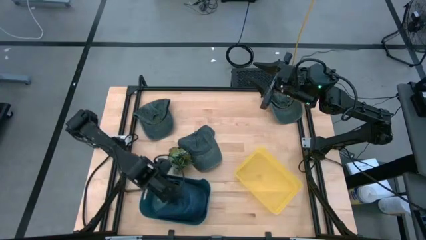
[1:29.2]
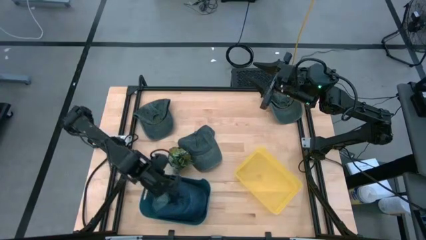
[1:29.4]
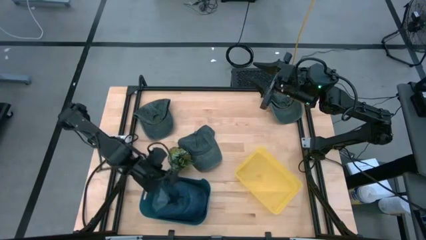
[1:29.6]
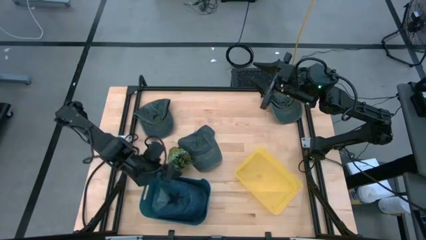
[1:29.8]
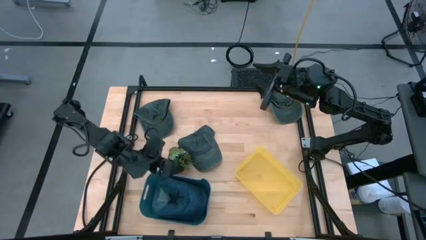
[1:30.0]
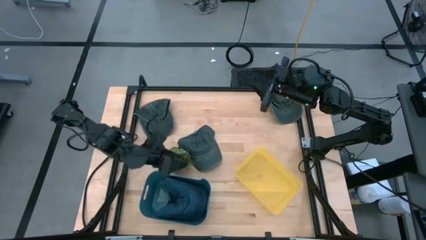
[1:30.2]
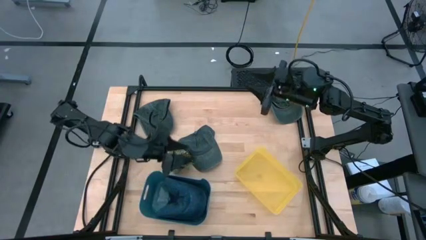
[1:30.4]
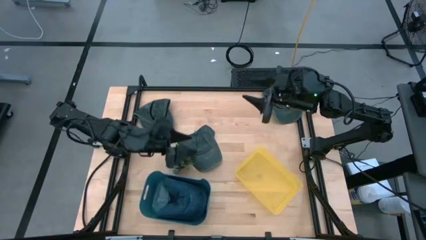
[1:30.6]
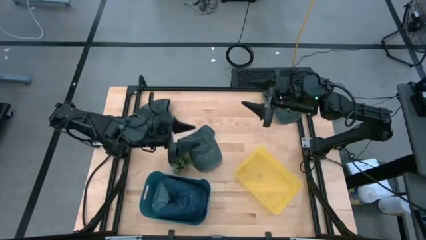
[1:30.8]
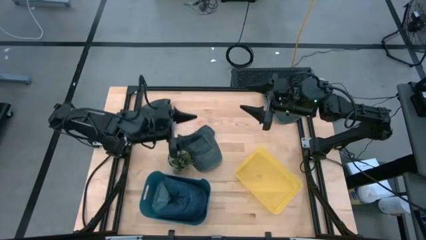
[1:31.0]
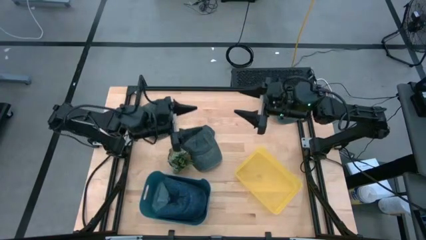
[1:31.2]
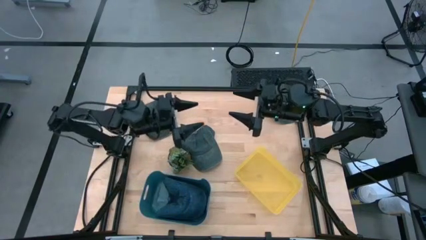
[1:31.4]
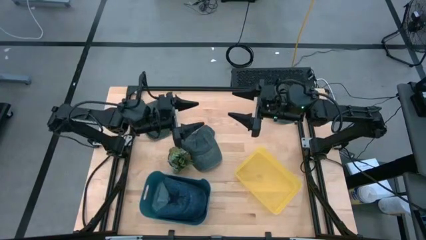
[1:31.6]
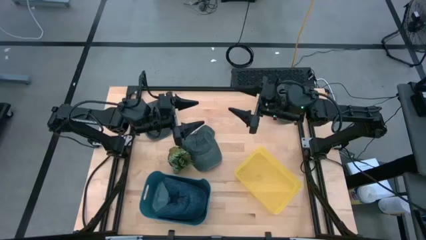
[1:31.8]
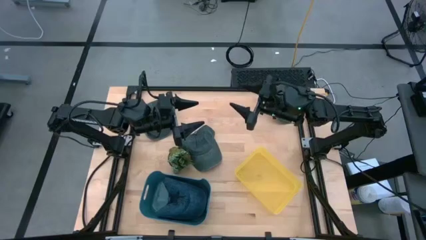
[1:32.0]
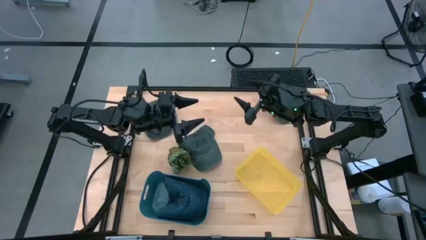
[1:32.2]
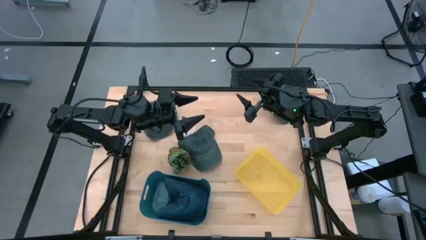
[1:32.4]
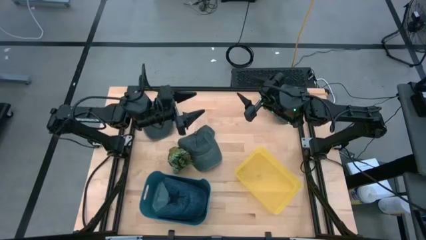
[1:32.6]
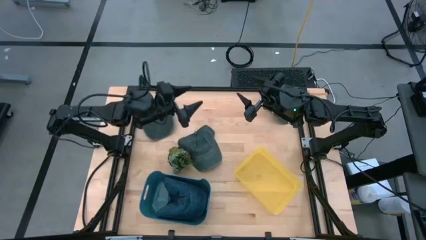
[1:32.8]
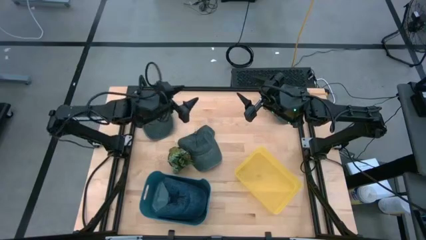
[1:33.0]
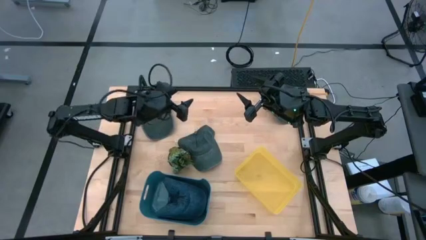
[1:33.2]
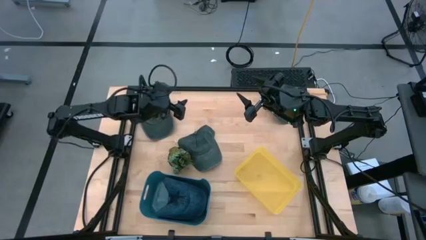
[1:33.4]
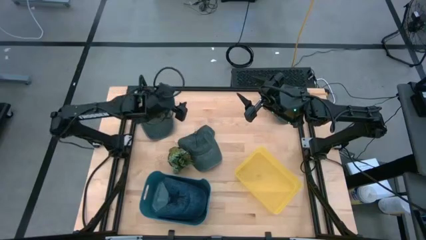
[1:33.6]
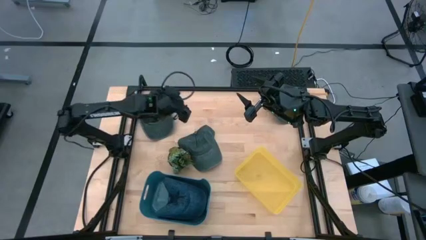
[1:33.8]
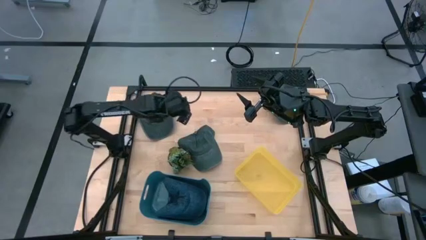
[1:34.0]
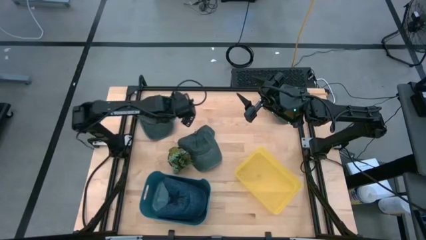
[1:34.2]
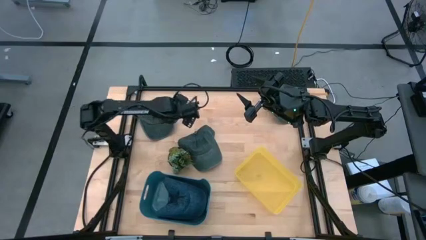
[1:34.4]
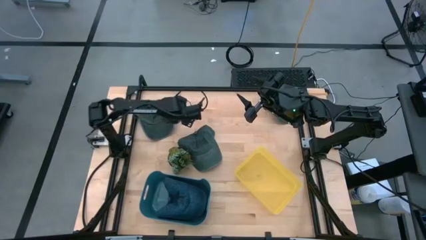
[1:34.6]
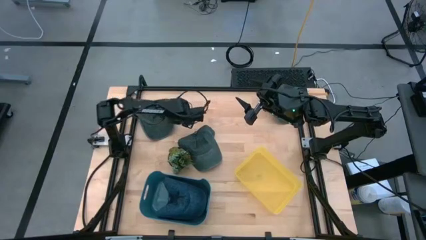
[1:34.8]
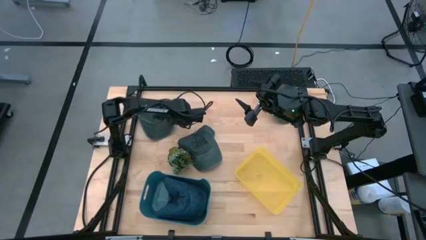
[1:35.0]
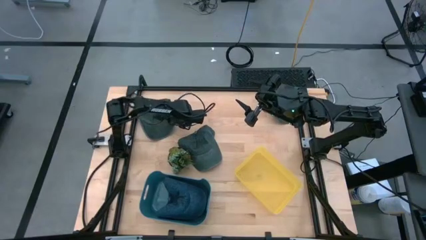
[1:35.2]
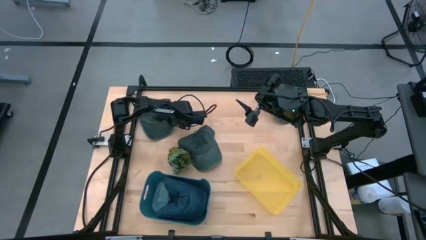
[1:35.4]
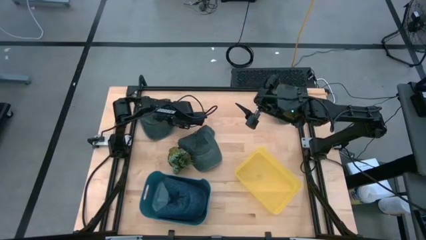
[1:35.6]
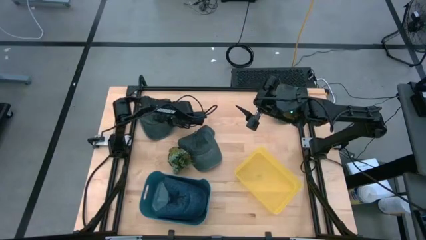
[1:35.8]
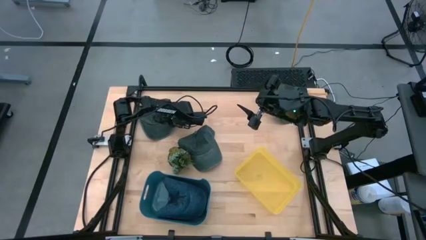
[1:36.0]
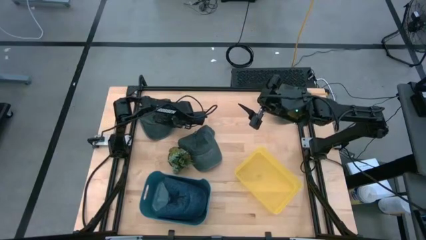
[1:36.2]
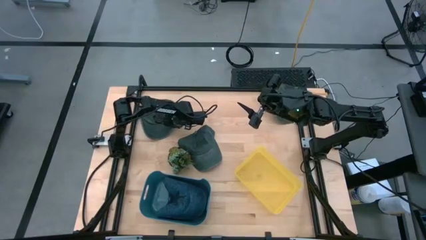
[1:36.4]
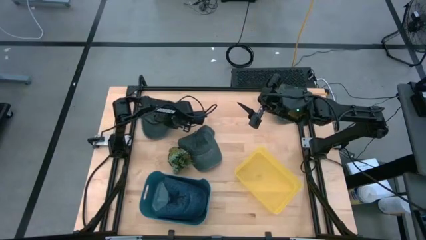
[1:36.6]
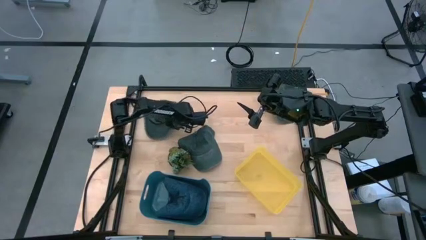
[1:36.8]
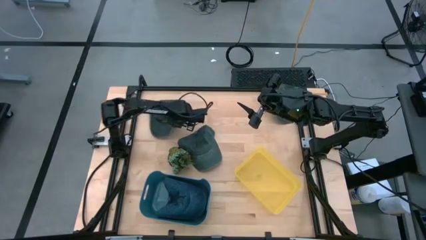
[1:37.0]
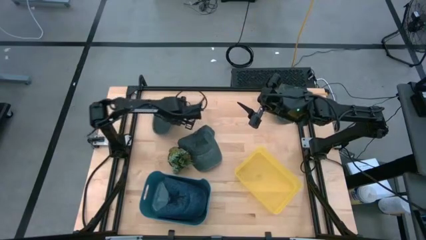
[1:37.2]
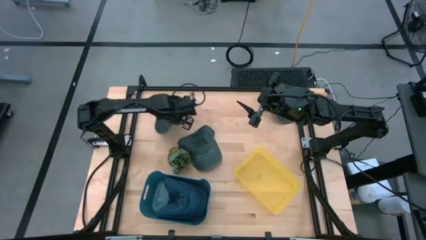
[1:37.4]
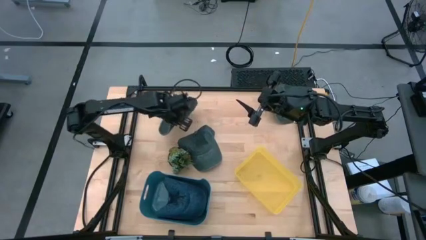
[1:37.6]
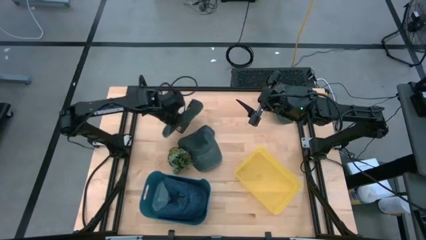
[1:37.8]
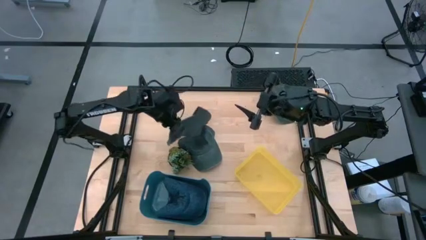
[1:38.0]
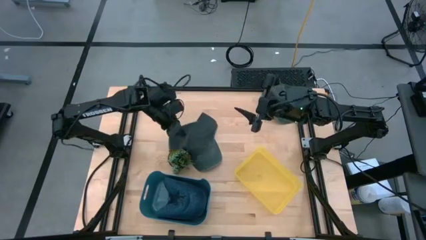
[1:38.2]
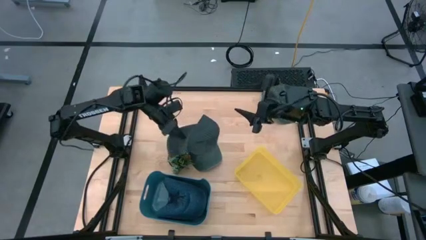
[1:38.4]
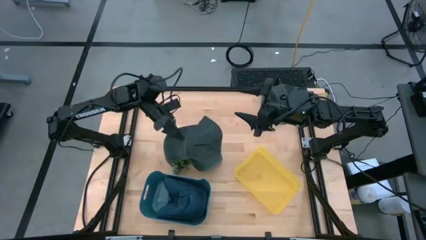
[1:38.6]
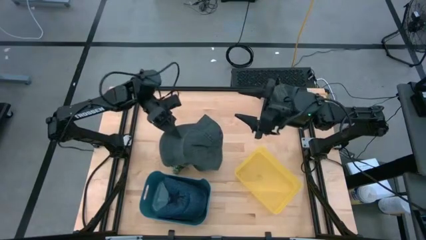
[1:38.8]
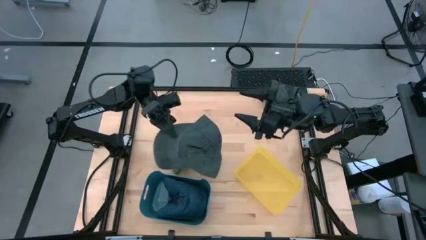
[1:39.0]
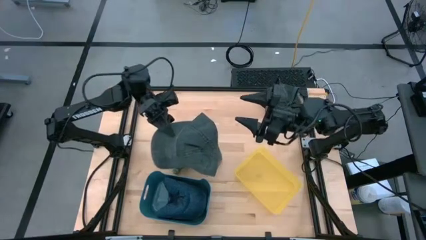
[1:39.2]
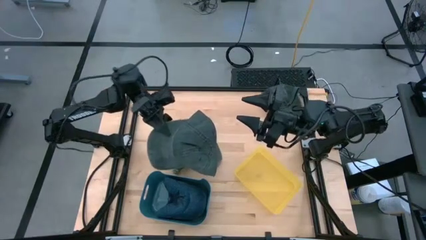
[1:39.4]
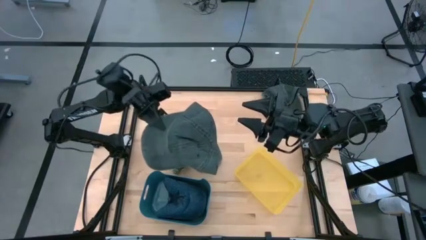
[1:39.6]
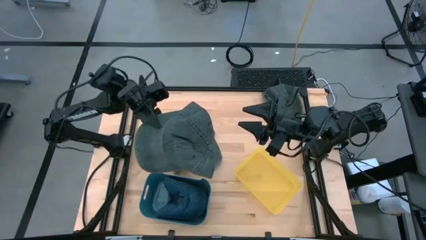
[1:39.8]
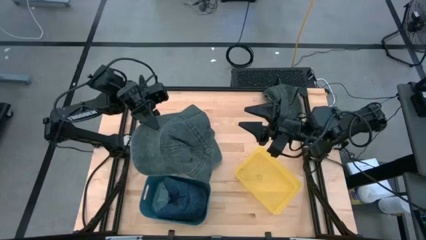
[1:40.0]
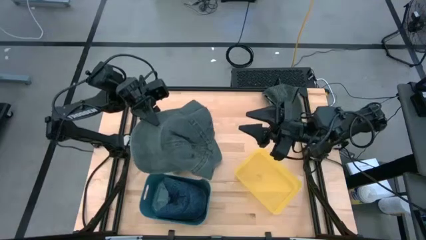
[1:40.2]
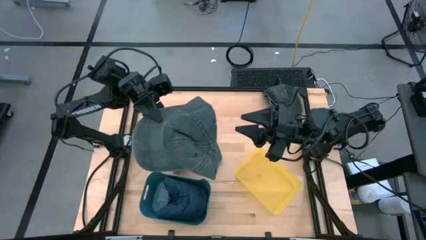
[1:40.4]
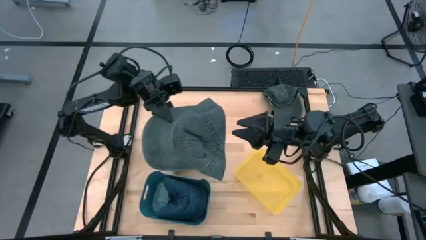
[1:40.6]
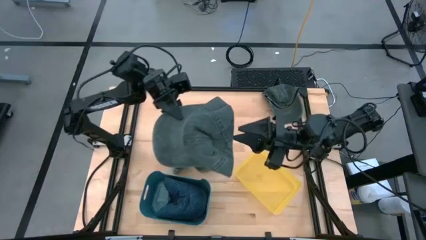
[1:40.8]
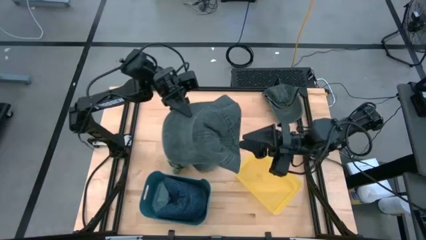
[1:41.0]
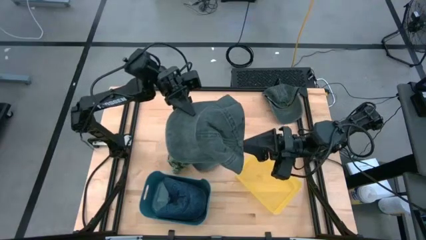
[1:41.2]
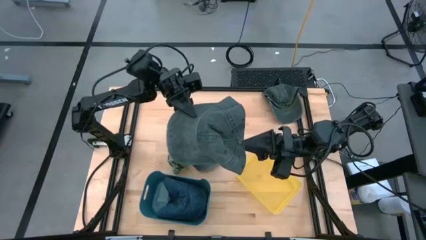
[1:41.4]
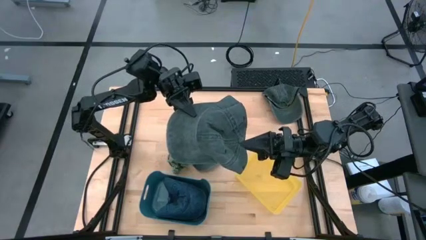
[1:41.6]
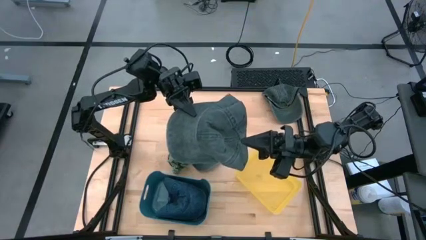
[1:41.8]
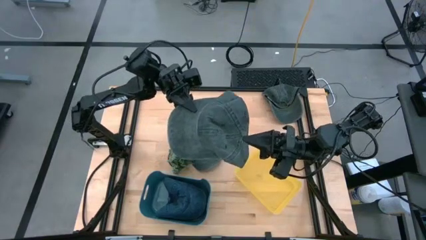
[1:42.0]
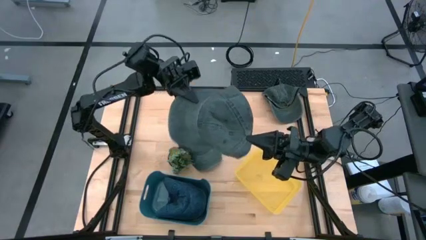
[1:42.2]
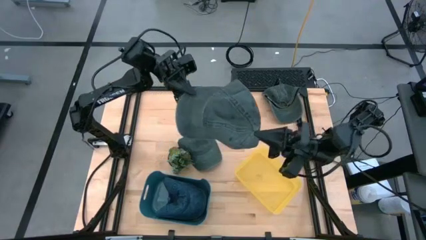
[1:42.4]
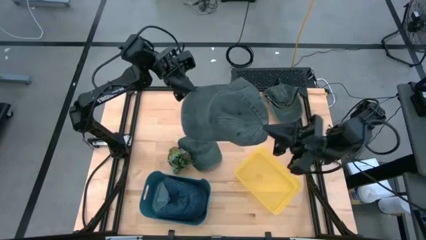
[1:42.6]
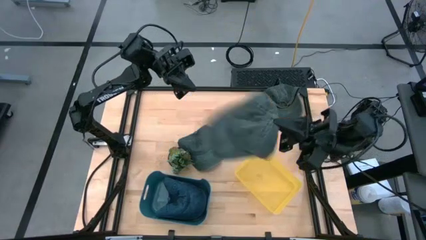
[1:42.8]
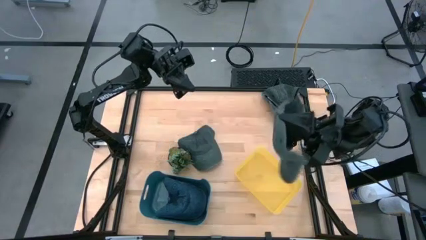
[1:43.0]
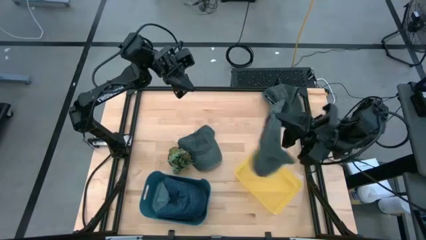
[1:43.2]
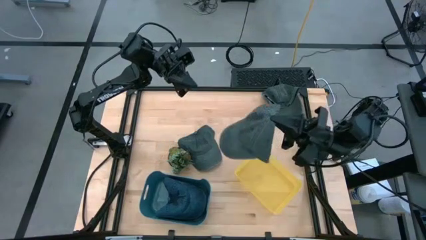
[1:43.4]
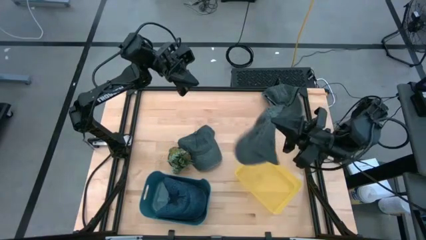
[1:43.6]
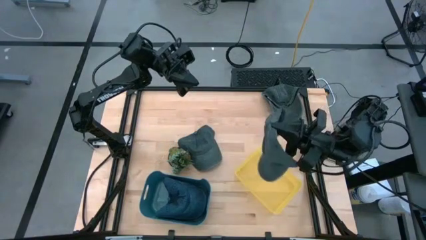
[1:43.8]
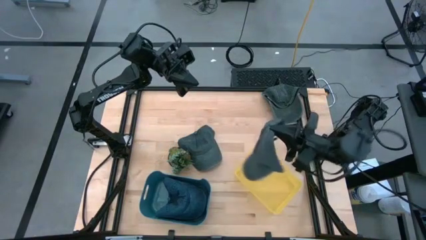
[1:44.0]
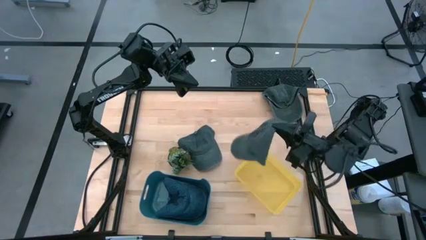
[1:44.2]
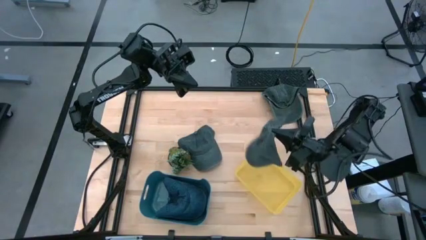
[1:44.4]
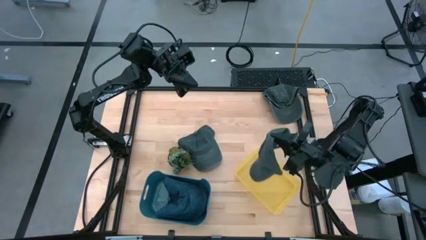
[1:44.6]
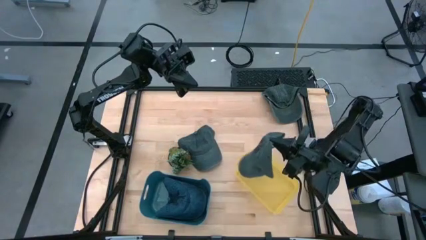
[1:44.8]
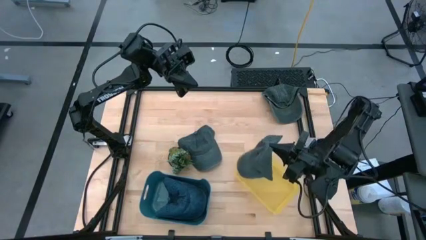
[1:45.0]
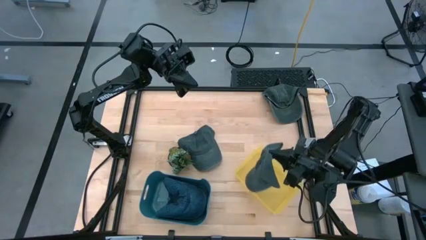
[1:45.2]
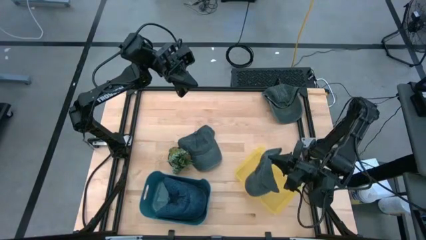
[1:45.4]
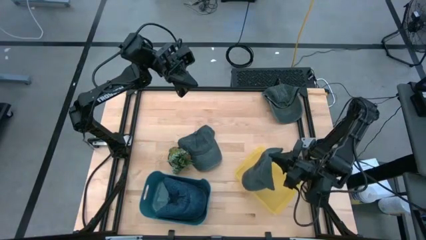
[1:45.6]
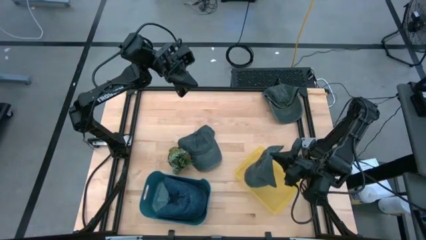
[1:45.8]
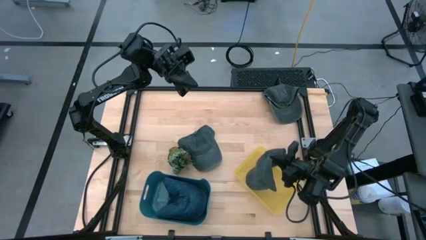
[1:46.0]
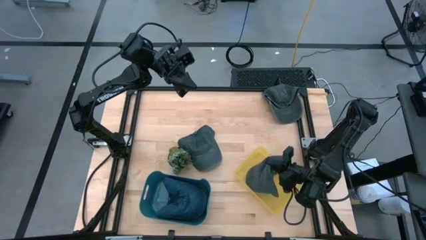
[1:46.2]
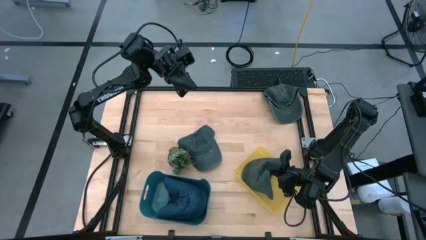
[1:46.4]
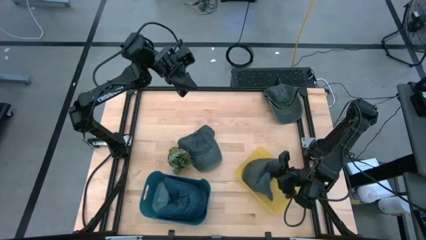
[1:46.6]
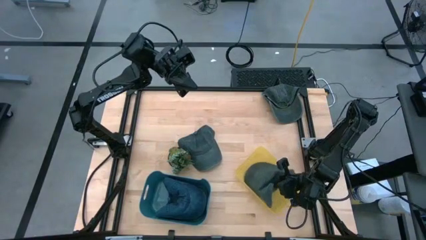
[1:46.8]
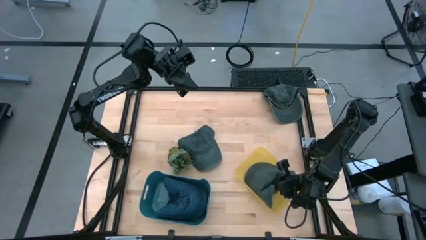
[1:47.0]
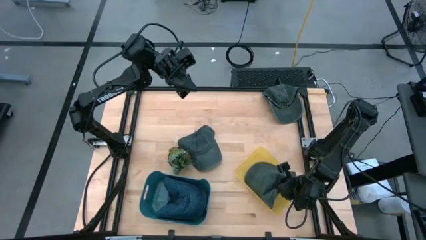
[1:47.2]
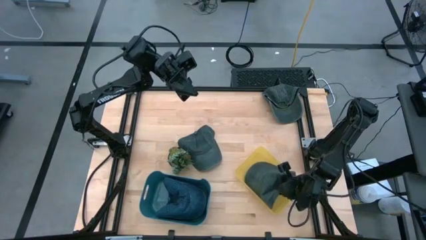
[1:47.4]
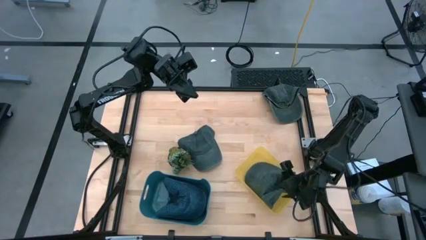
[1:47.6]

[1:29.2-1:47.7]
Task: Pick & Place hat
Put the middle black cap into the yellow bin
